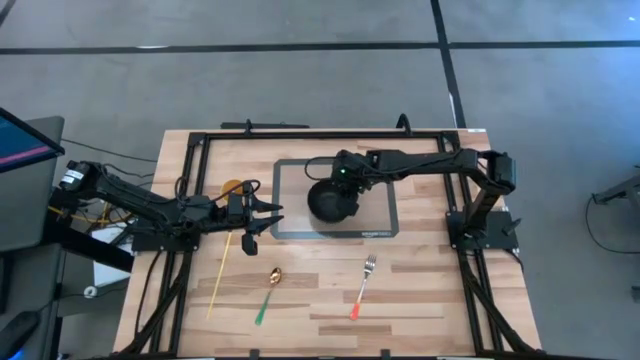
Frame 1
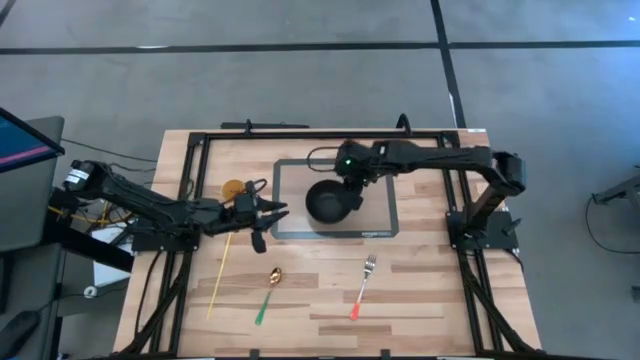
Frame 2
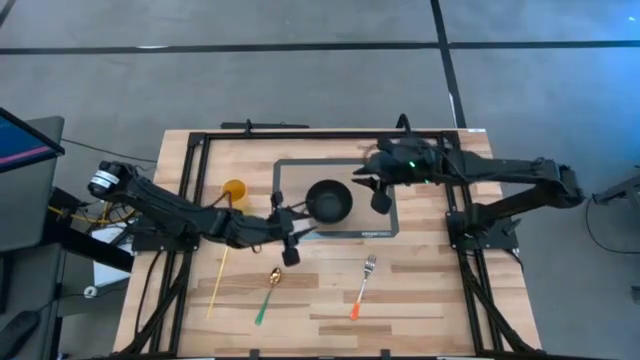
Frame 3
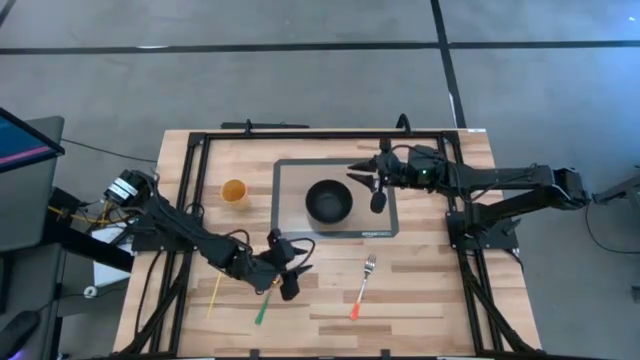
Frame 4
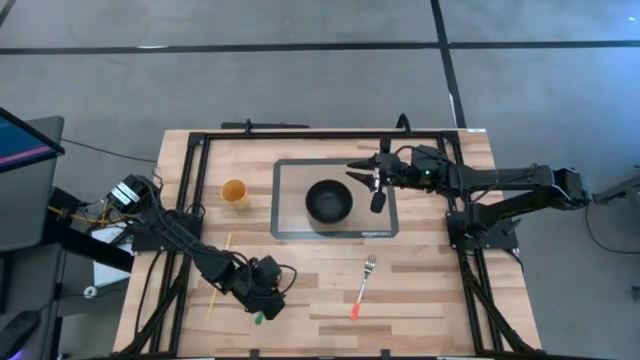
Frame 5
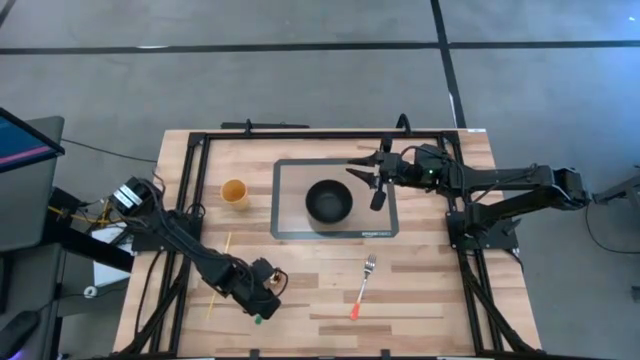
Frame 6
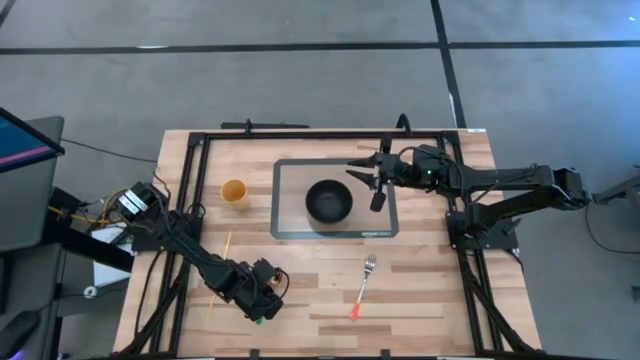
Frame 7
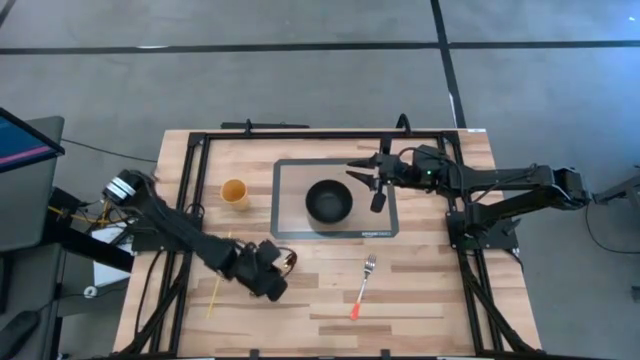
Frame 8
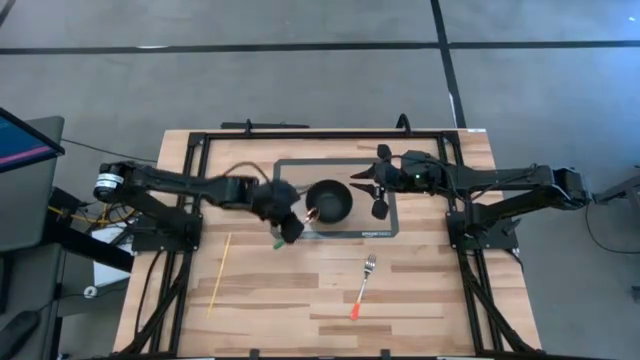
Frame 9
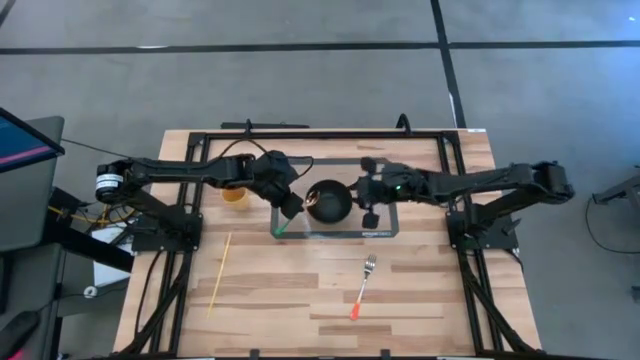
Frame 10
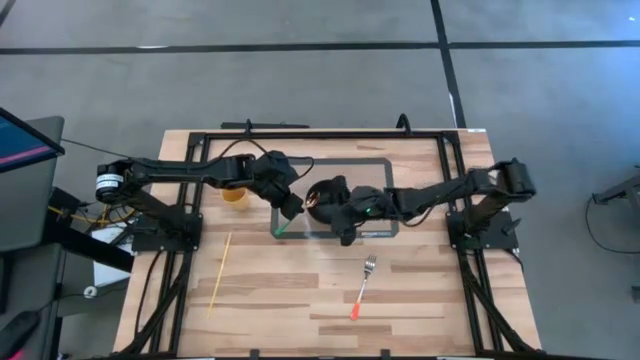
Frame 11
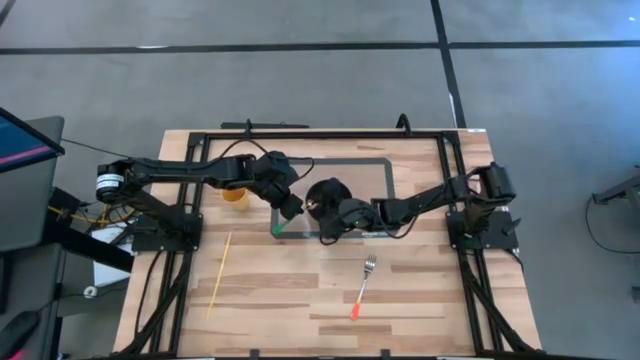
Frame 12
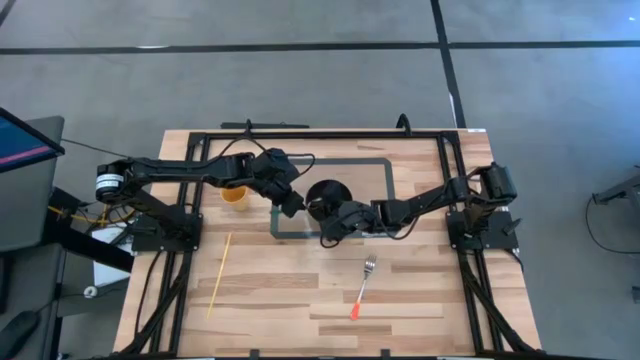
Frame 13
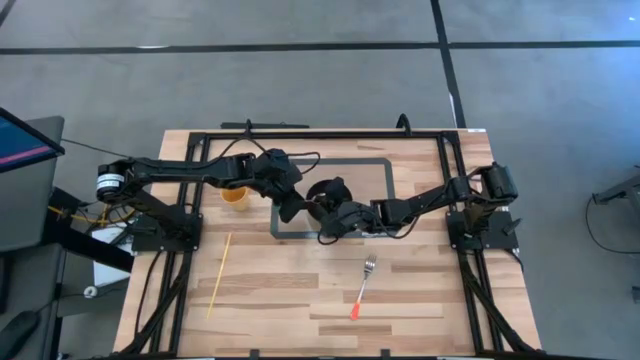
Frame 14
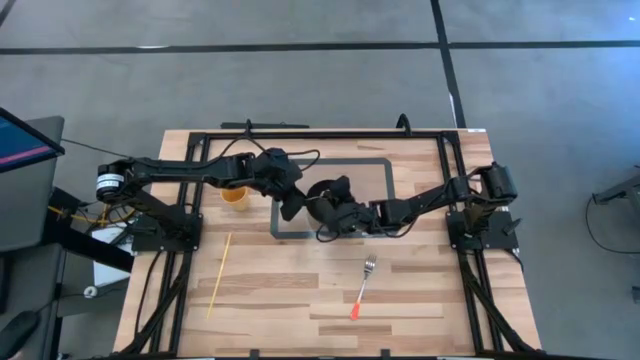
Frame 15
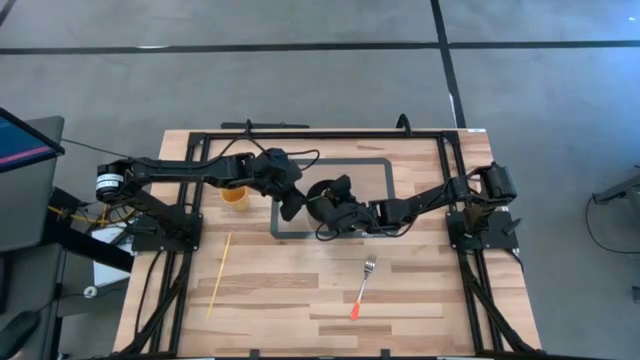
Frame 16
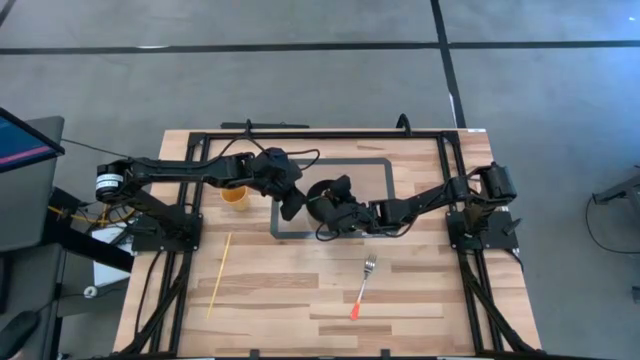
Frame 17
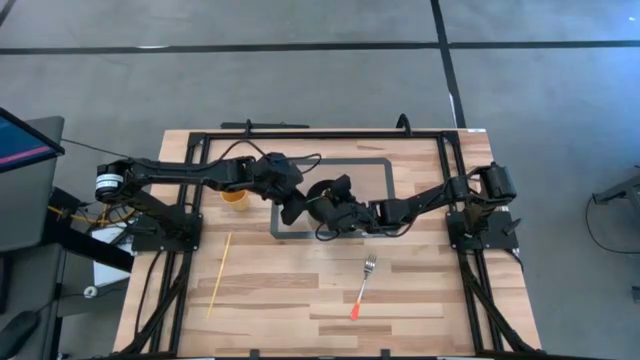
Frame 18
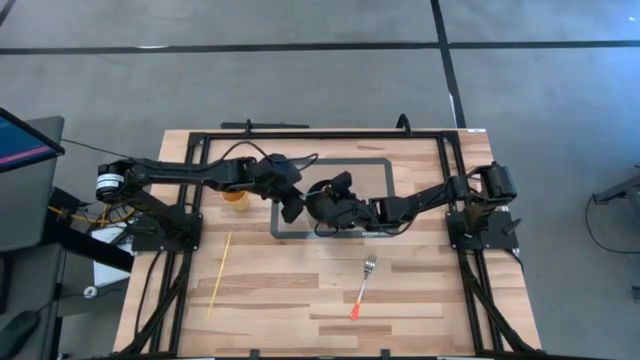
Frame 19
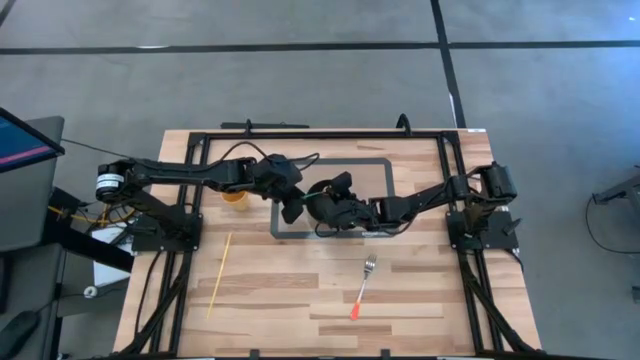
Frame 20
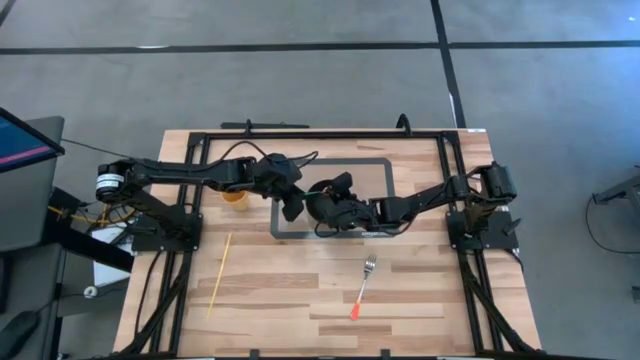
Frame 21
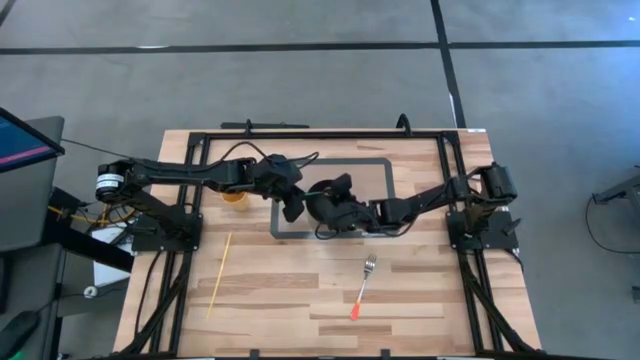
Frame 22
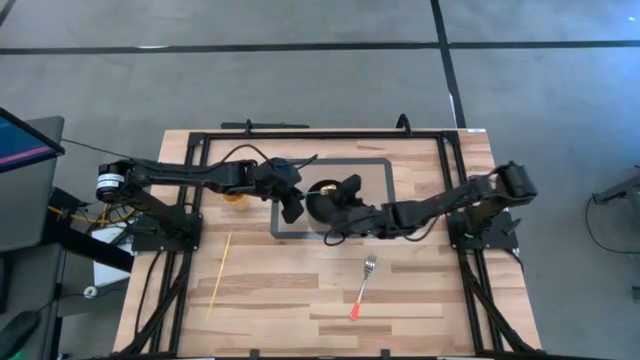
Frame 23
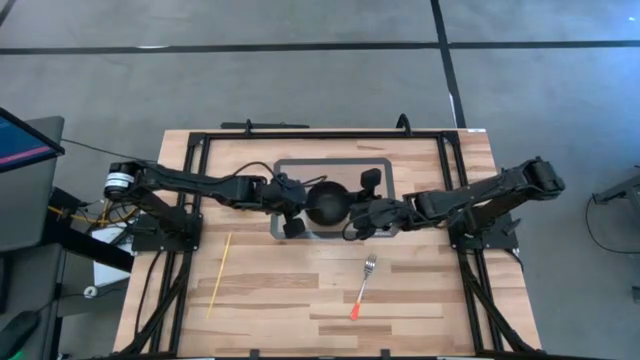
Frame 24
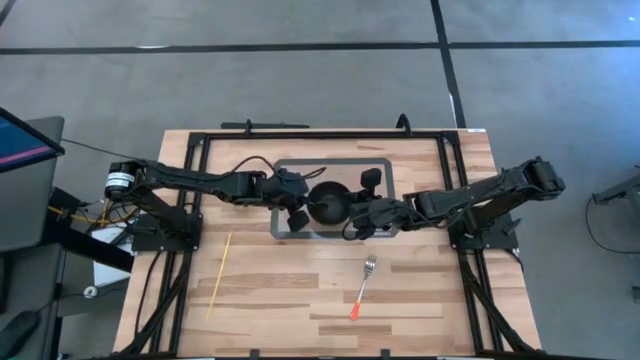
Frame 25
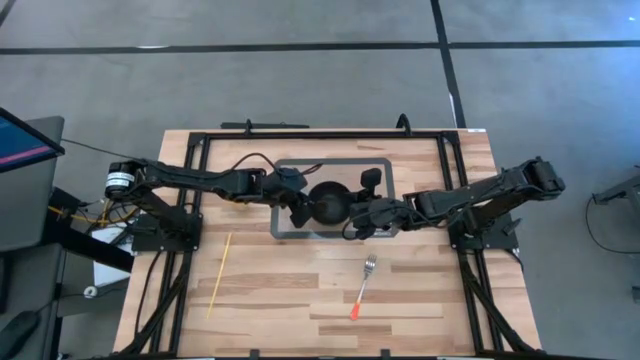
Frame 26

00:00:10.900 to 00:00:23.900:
Task: Pick & Place Utensil
Put the gold spoon into the black bowl

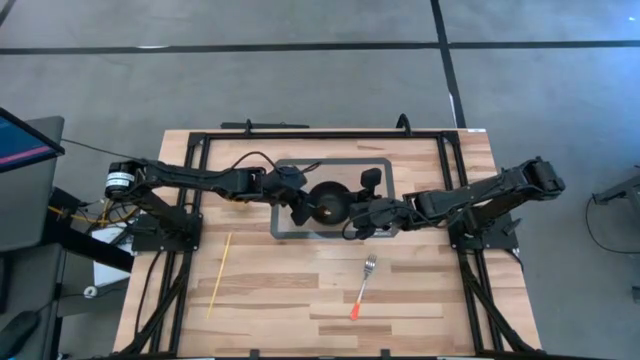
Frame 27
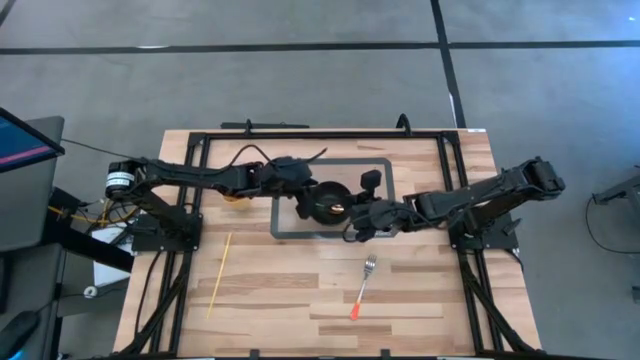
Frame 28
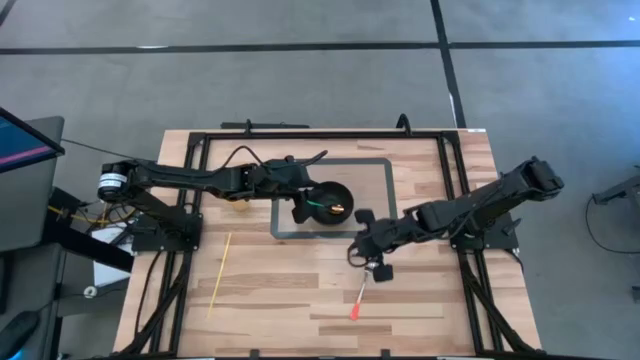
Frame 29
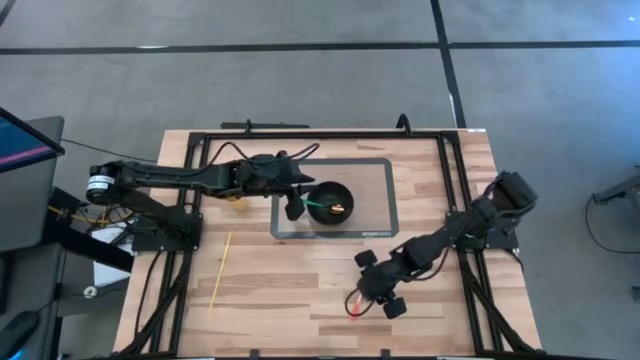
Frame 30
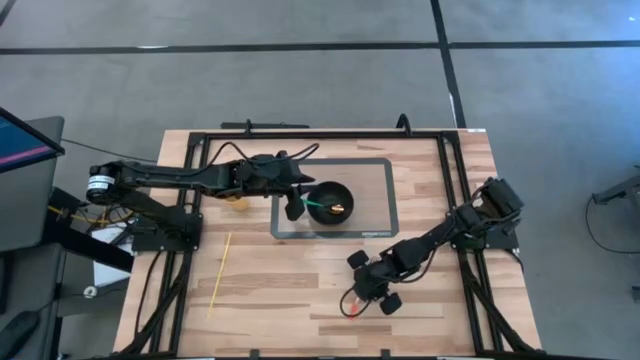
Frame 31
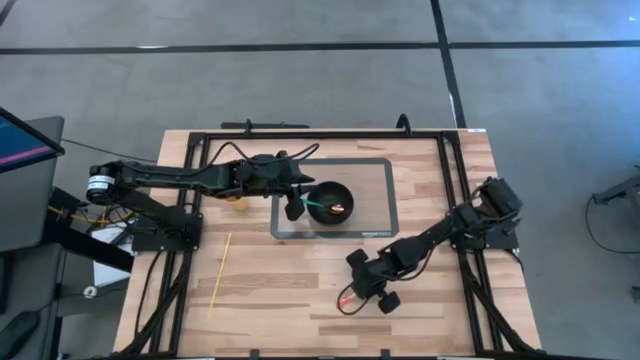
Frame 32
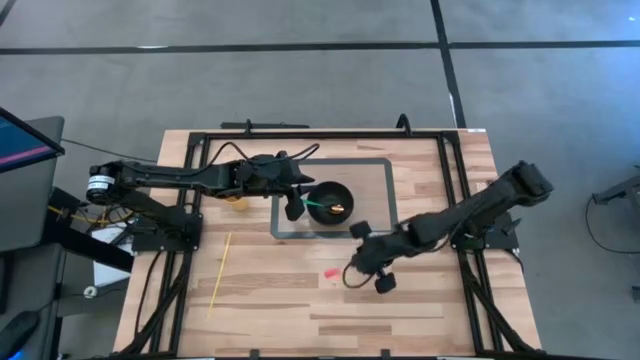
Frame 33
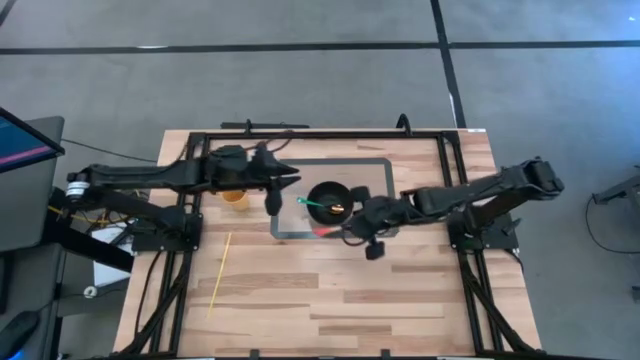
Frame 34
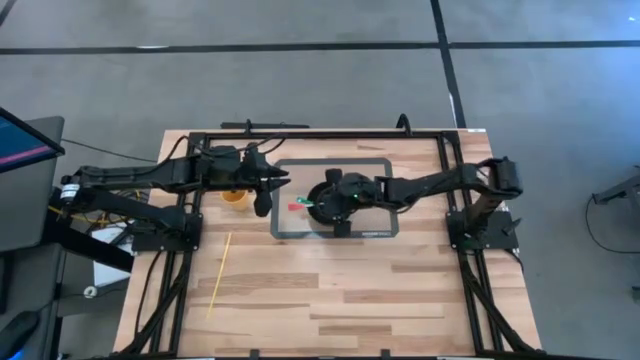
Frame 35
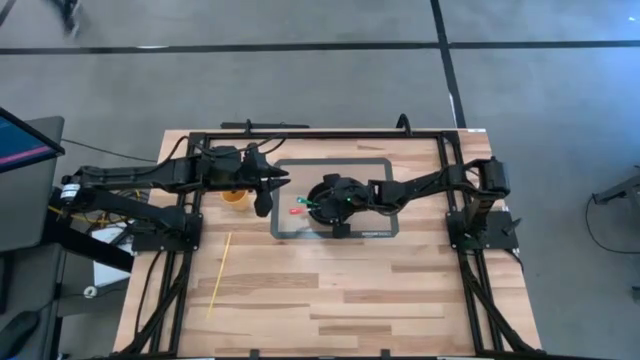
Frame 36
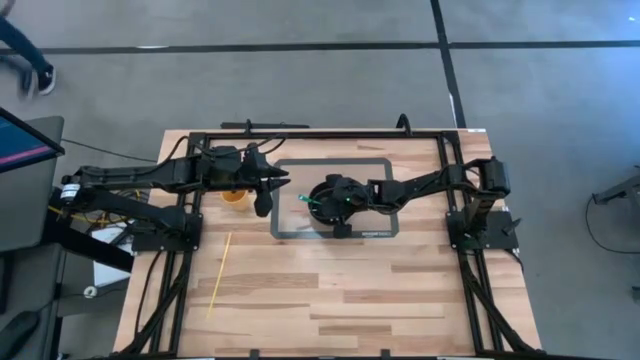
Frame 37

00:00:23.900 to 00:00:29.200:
Put the silver fork into the black bowl

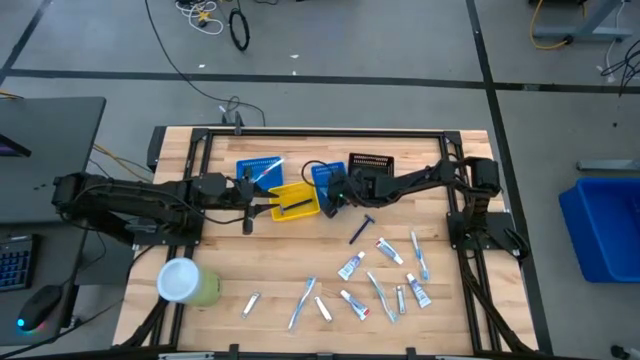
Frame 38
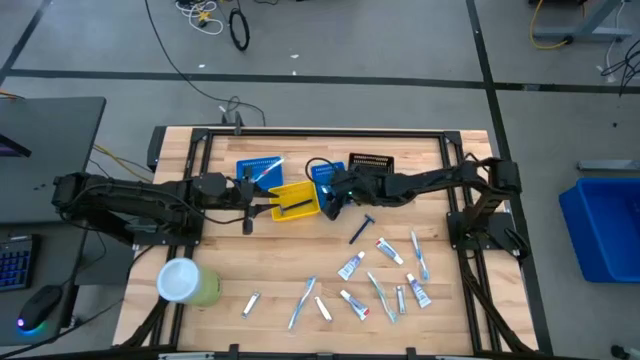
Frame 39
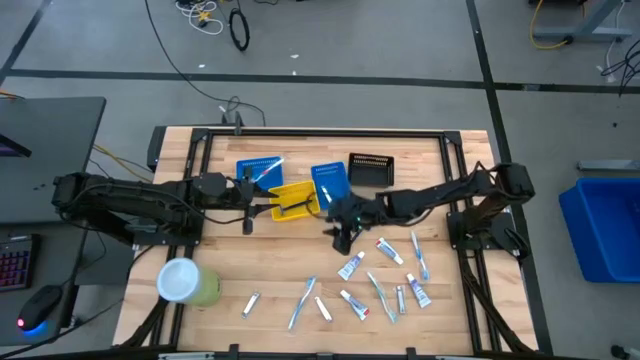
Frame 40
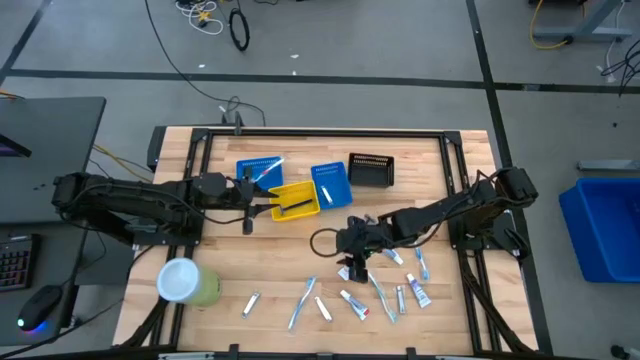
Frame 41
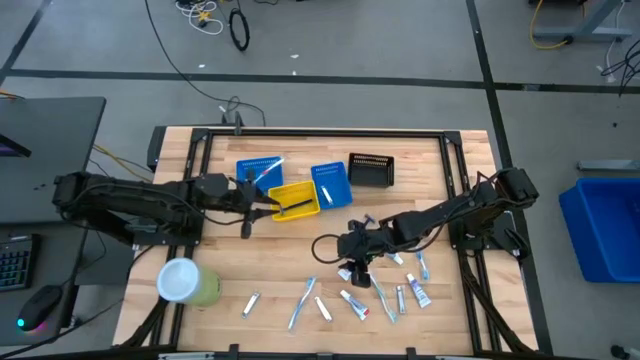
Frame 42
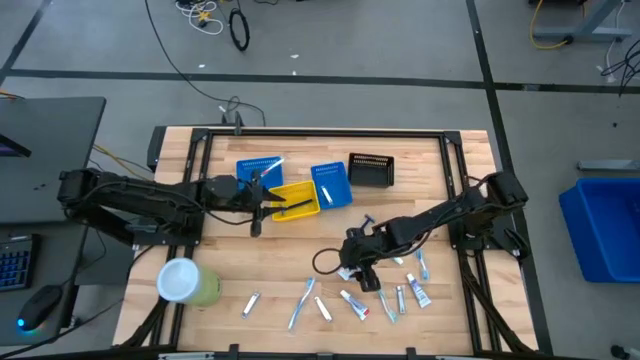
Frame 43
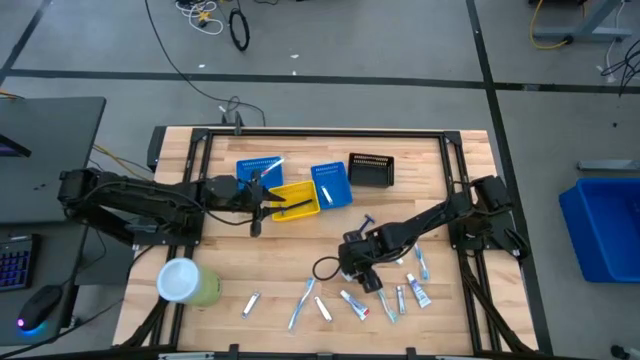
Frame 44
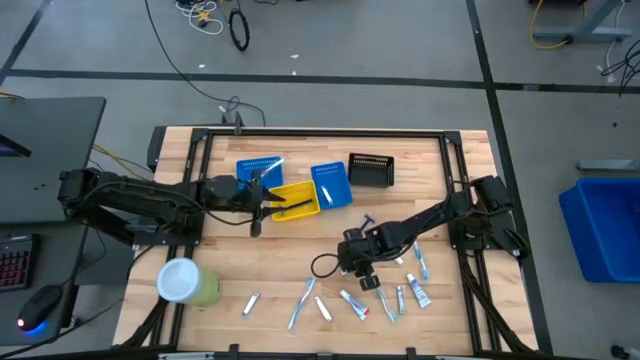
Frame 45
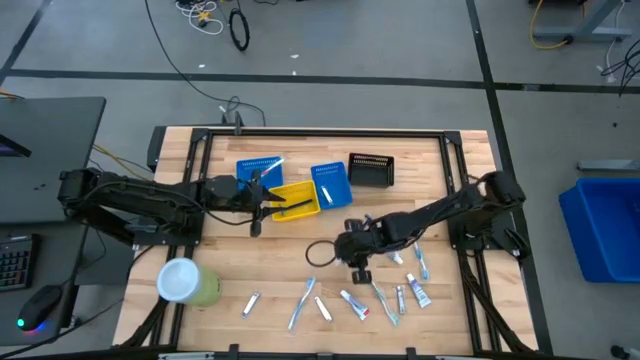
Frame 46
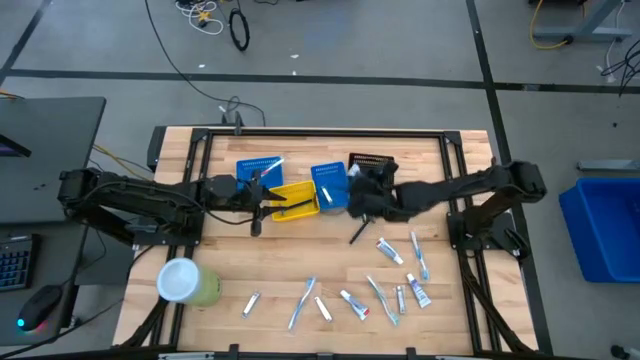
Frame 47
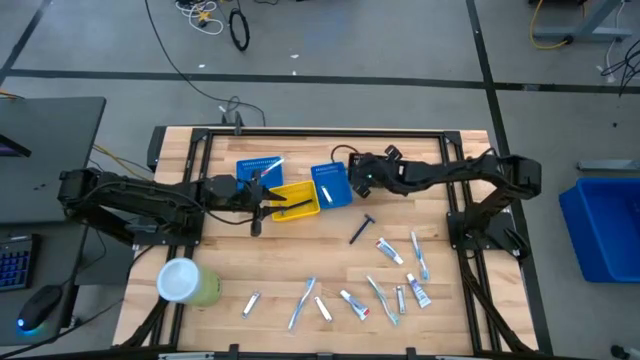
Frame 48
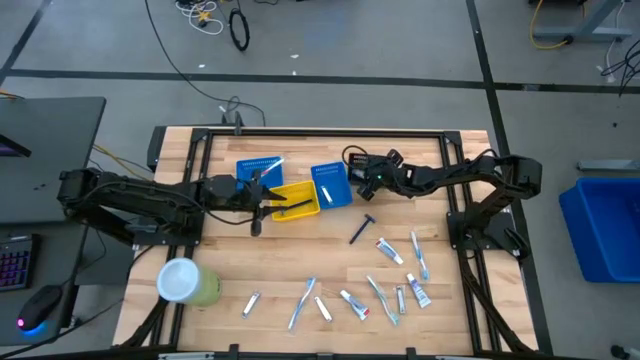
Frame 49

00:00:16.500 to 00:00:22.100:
Task: Pick & Place Travel size toiletries
Put the toothpaste into the black bin
